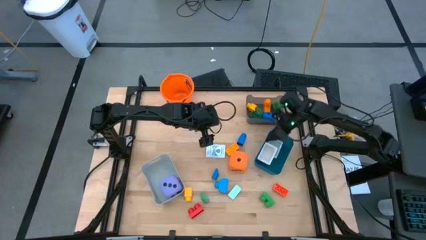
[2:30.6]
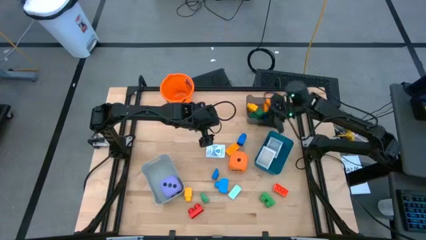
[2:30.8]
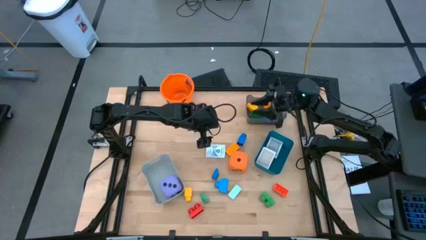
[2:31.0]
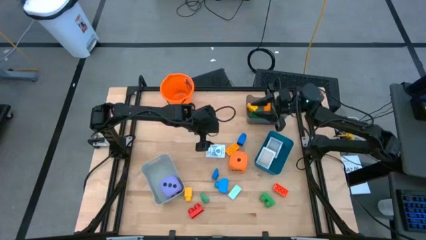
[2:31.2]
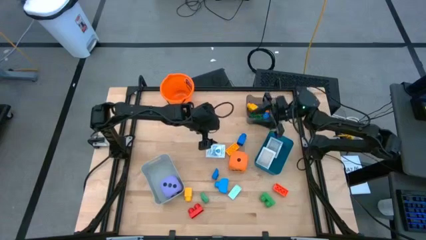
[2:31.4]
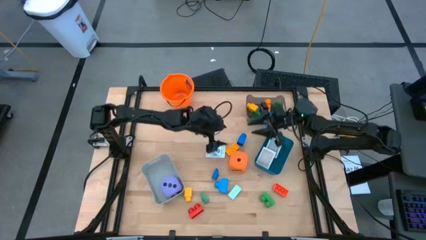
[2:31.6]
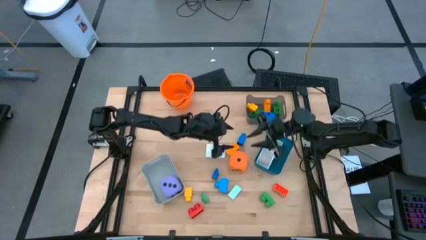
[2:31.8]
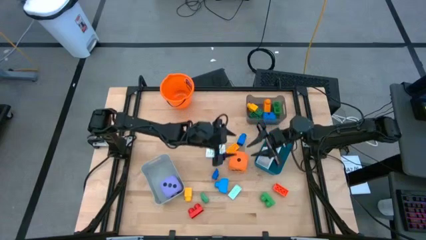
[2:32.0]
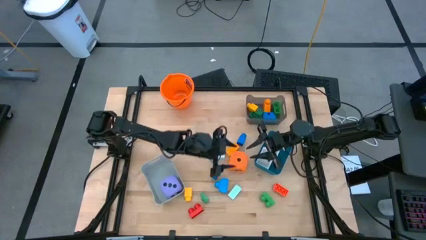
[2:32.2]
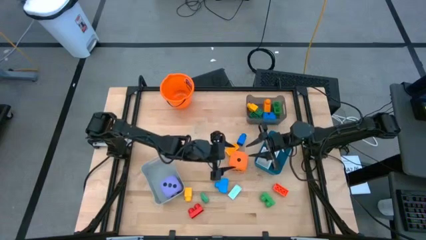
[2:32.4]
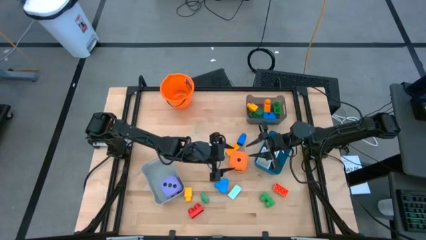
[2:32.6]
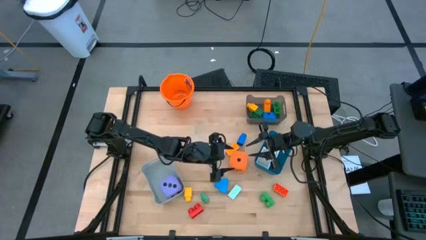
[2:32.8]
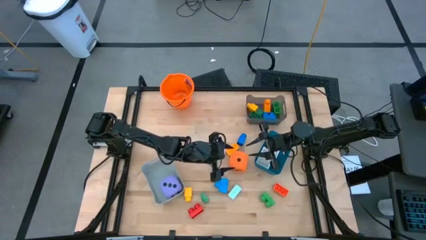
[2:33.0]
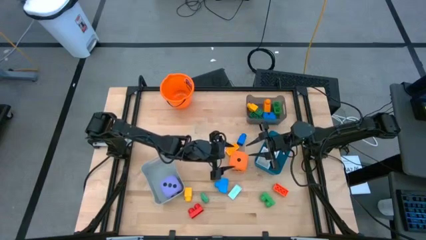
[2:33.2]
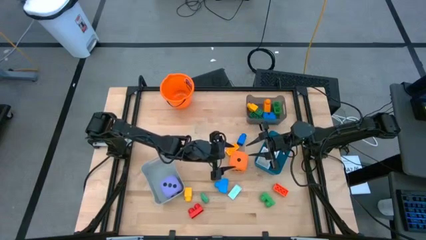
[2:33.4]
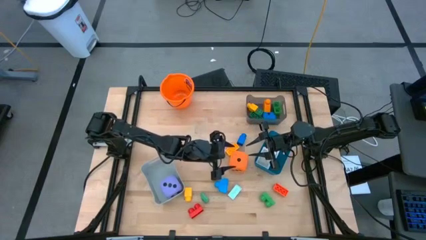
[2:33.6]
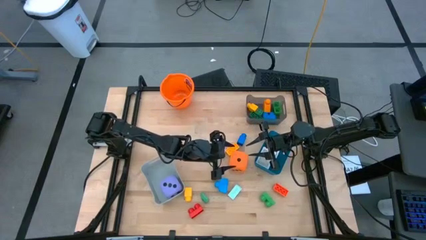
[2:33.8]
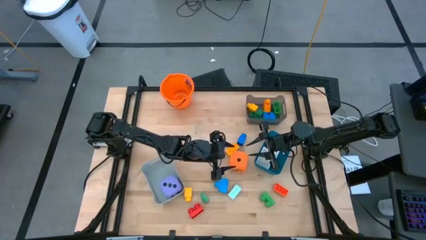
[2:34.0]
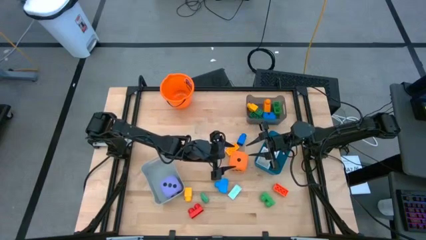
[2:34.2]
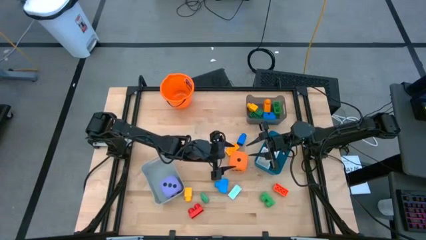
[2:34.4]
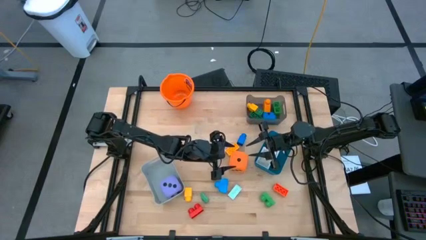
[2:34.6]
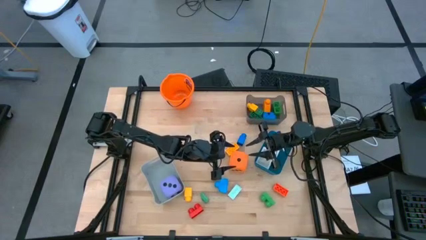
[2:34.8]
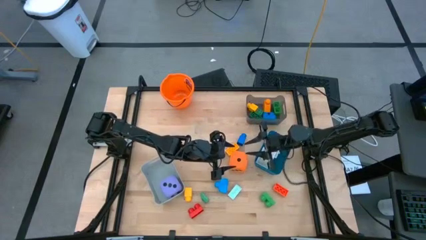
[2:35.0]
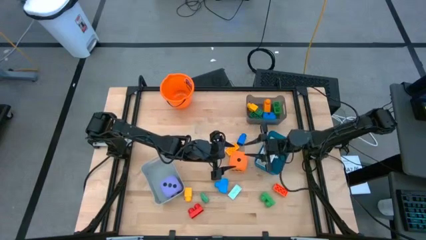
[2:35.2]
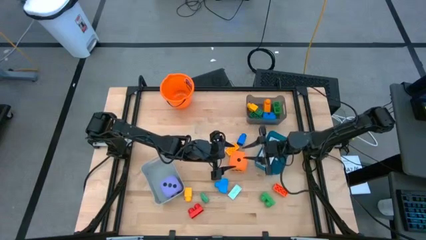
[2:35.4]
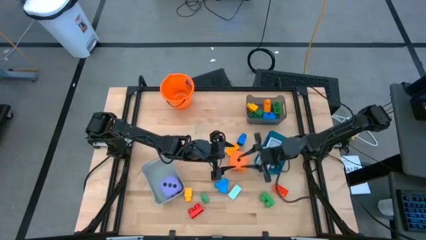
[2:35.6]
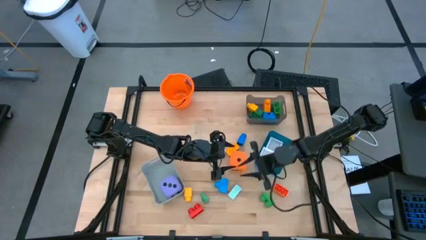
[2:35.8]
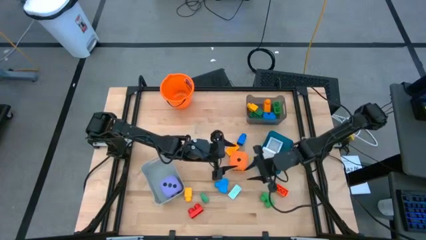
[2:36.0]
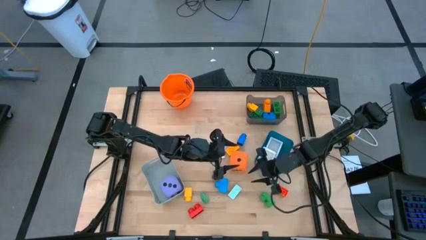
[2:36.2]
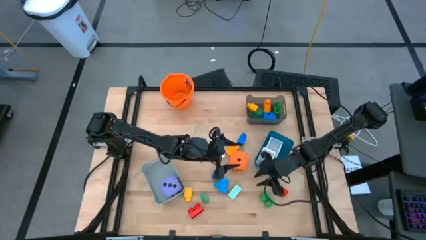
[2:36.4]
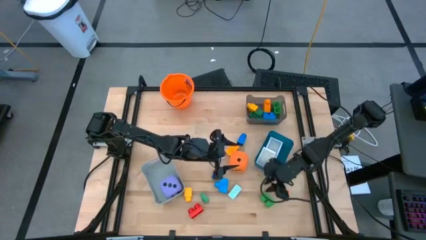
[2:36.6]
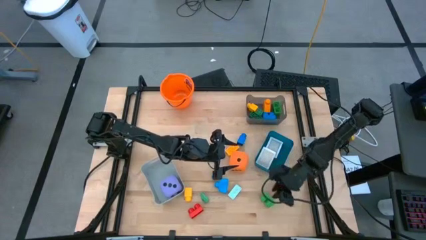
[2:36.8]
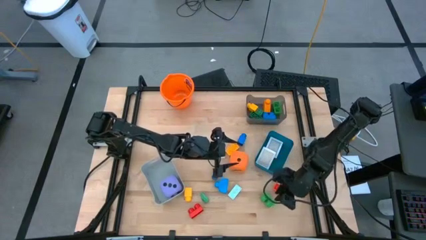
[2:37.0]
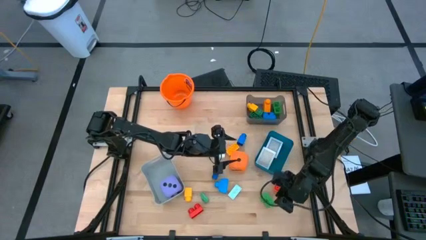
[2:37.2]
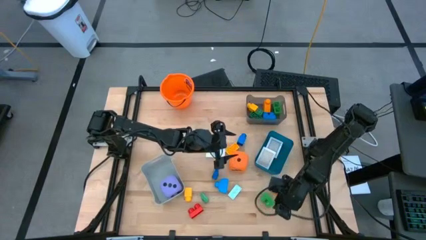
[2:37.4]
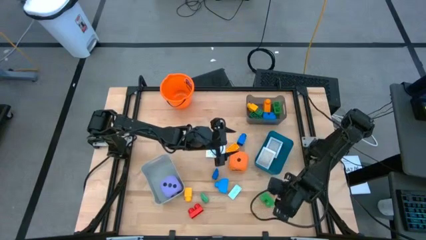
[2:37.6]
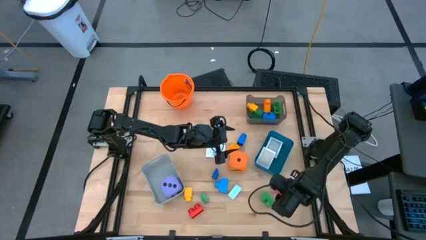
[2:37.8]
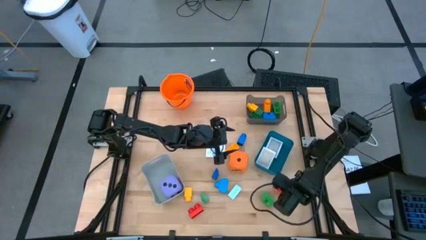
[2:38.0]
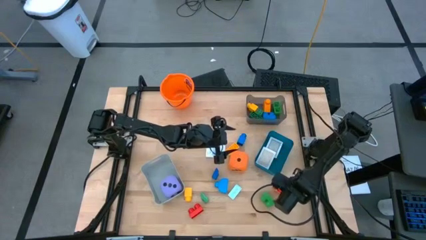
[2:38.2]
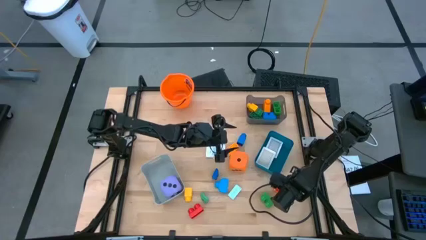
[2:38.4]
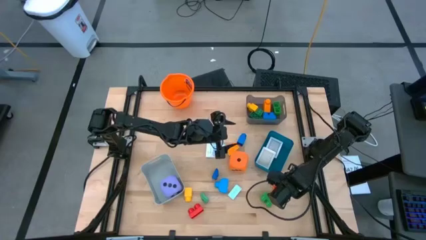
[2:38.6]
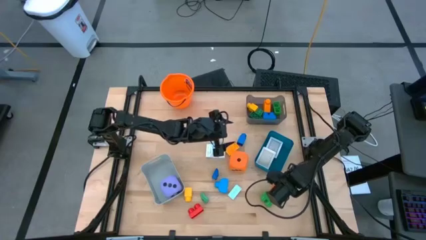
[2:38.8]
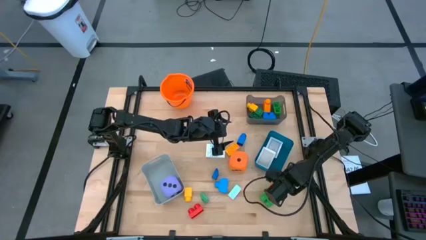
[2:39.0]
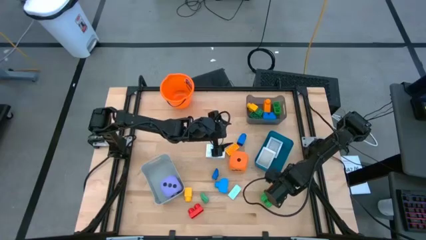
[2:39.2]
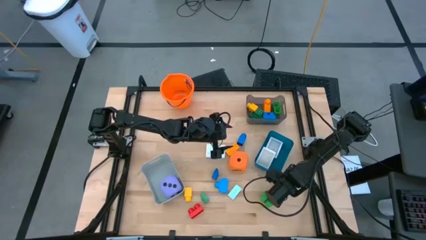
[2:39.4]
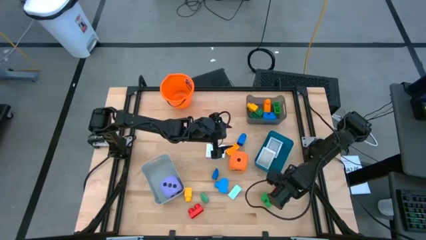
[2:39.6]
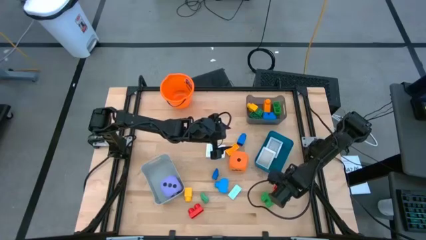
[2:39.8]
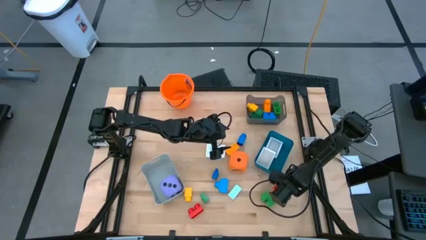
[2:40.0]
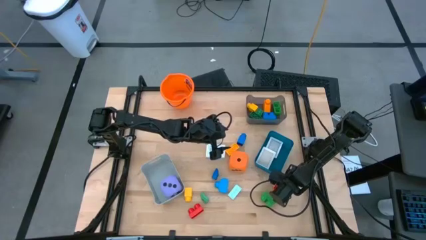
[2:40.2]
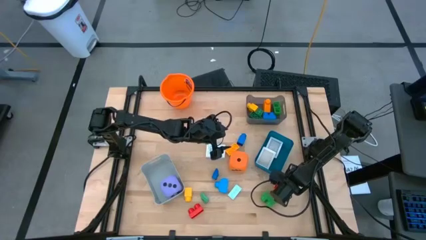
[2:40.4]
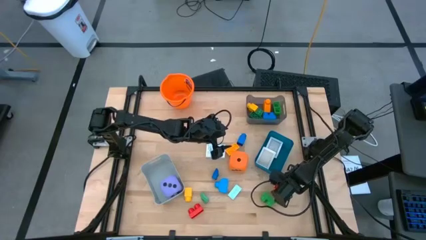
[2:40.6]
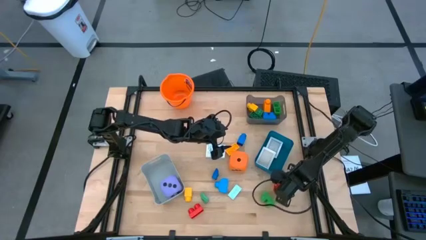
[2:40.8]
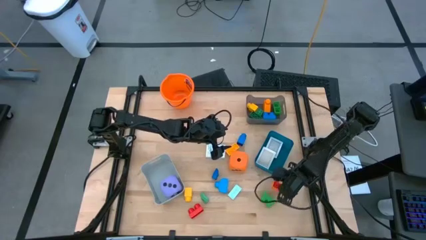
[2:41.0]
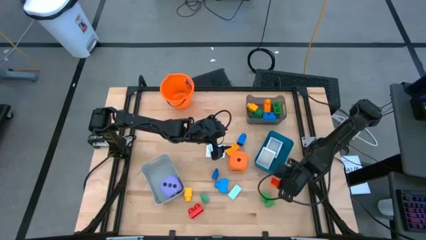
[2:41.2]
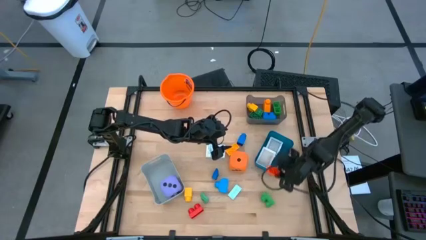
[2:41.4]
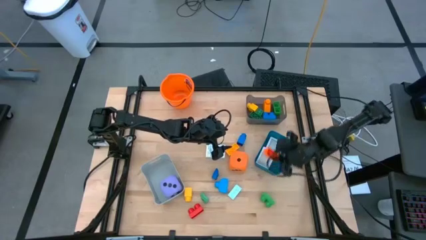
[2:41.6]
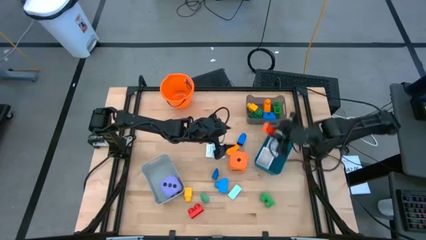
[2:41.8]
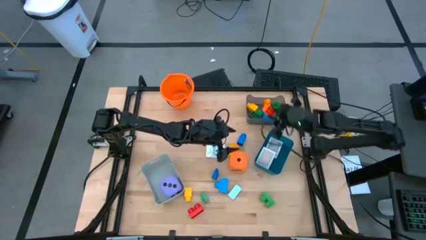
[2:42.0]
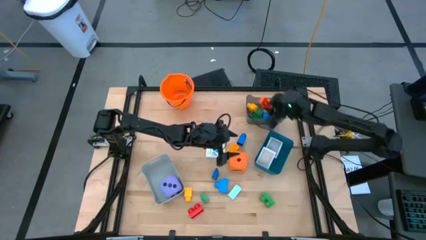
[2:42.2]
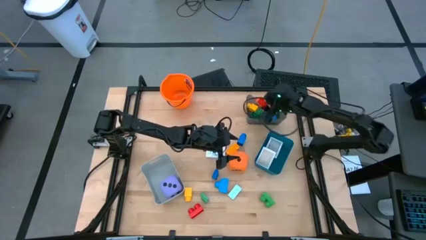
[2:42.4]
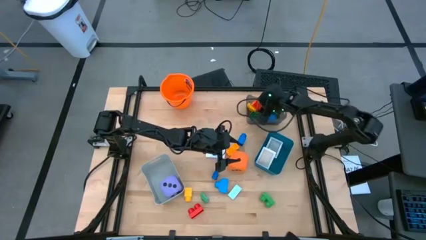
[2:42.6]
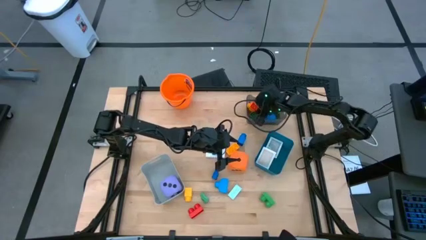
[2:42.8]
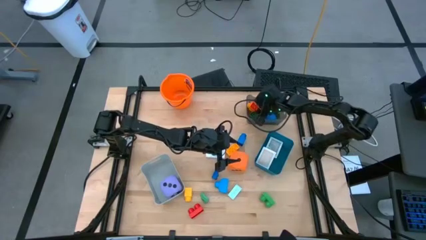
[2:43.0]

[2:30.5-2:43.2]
Task: Pick & Place Toys
Put the orange game piece into the black bin
